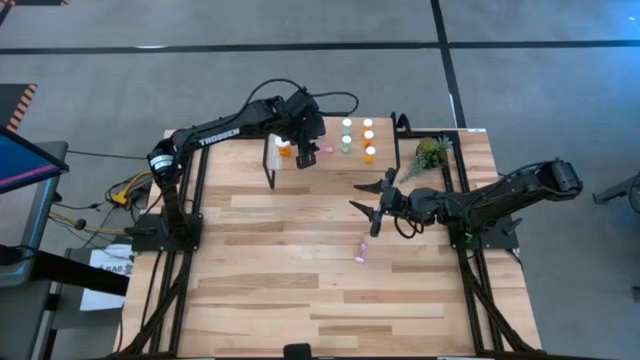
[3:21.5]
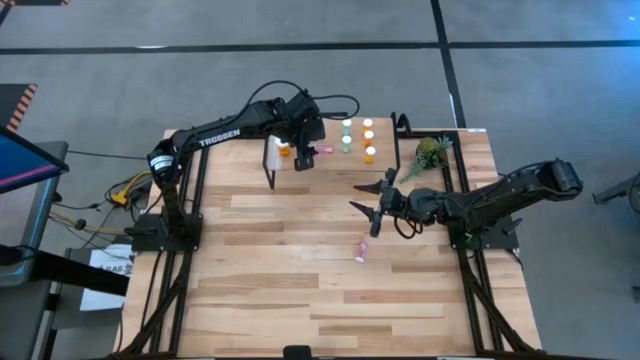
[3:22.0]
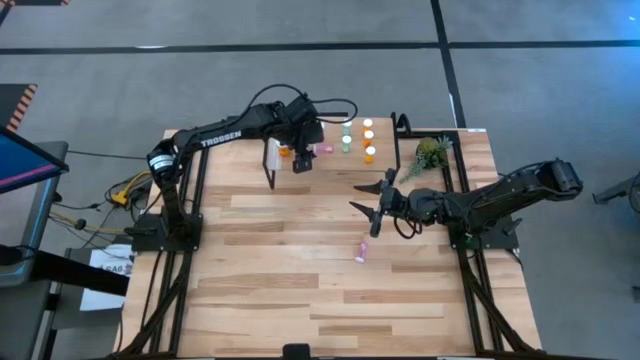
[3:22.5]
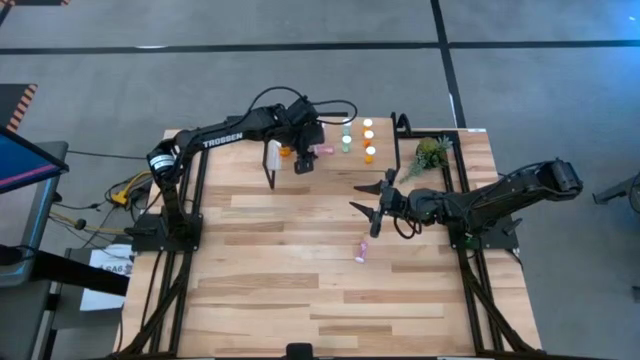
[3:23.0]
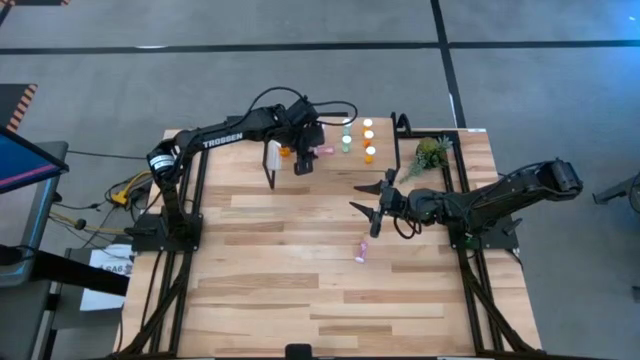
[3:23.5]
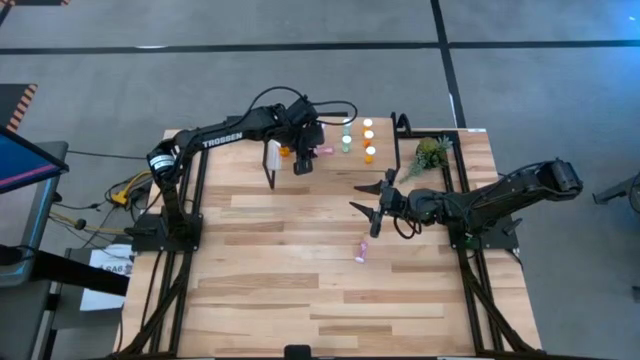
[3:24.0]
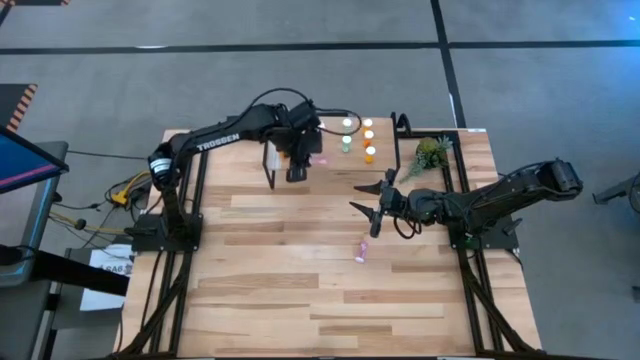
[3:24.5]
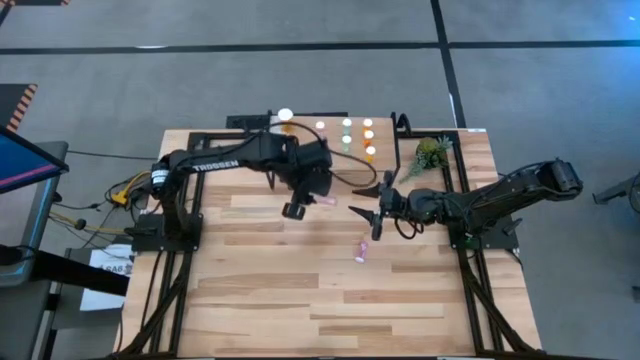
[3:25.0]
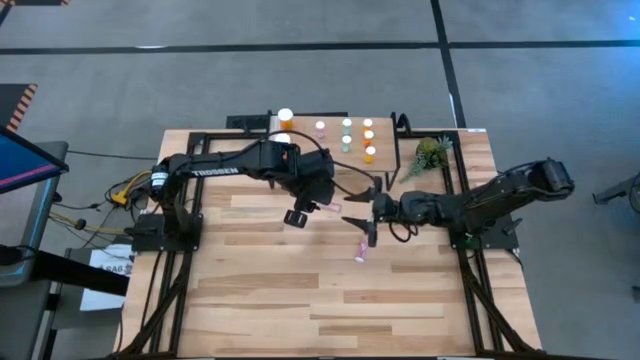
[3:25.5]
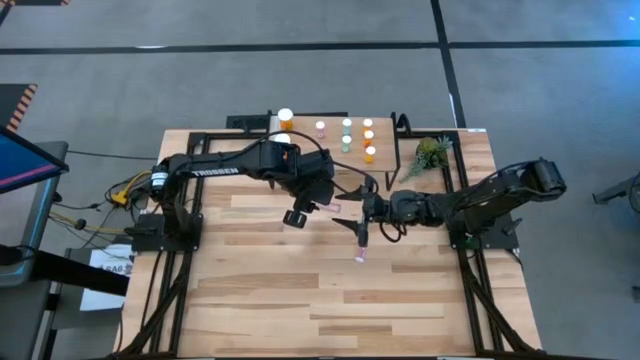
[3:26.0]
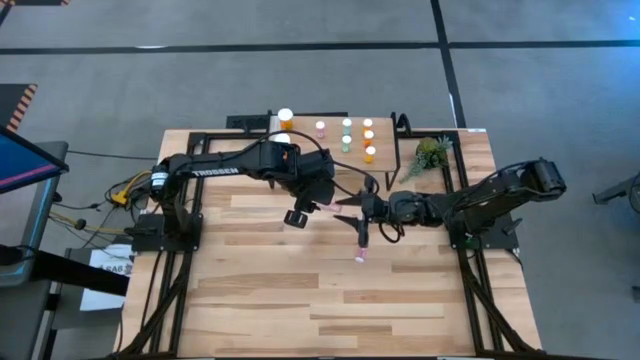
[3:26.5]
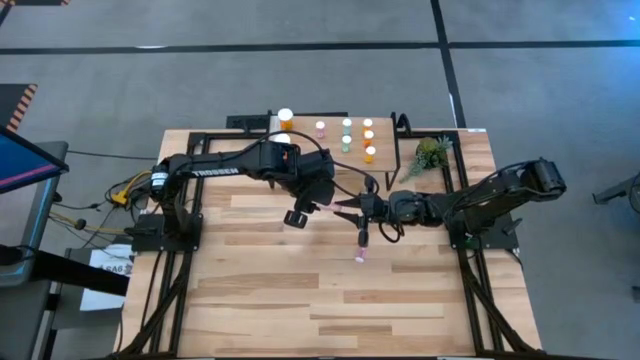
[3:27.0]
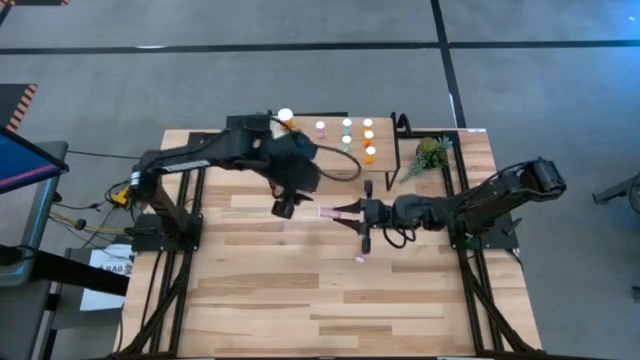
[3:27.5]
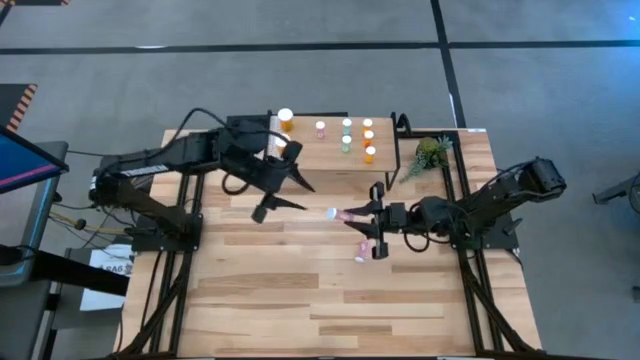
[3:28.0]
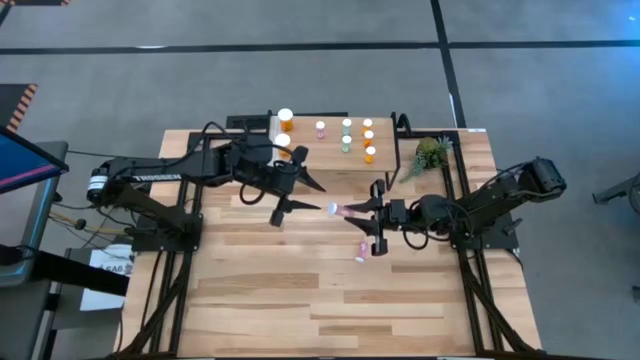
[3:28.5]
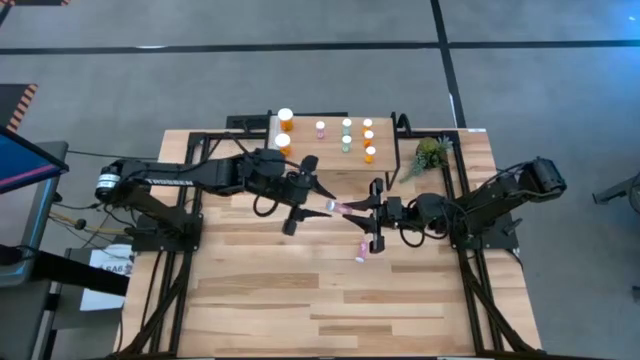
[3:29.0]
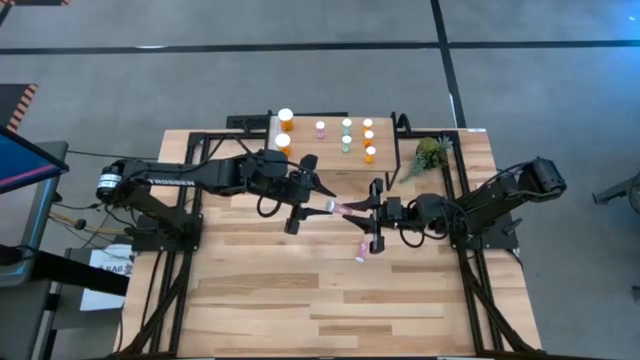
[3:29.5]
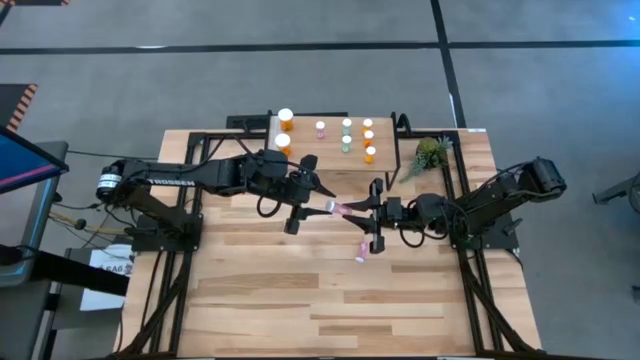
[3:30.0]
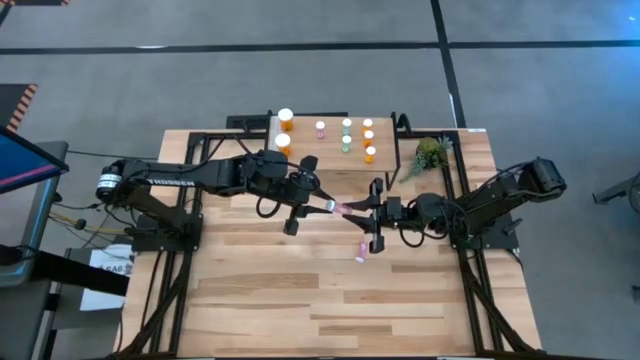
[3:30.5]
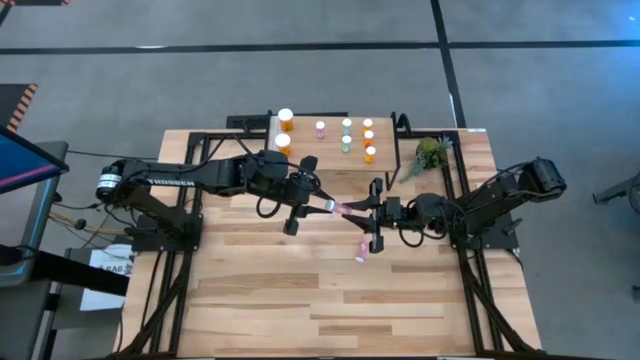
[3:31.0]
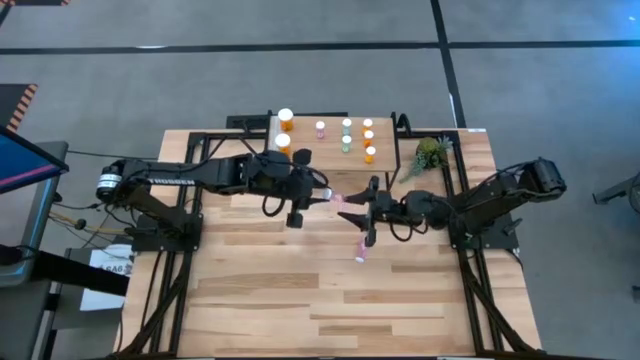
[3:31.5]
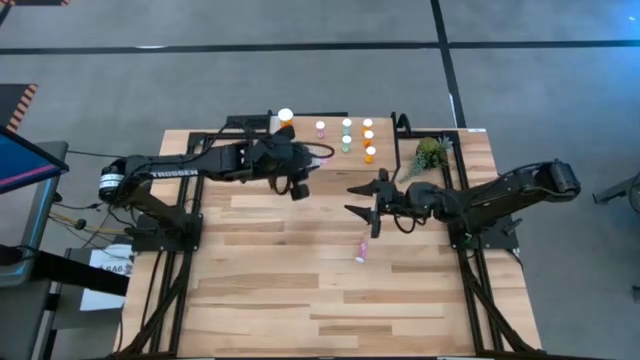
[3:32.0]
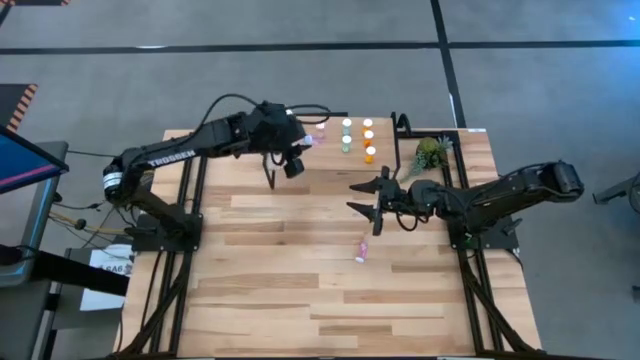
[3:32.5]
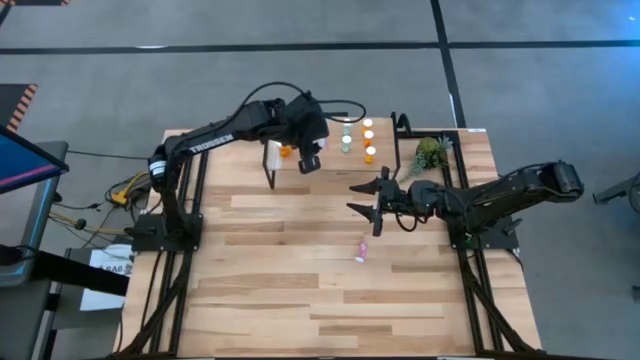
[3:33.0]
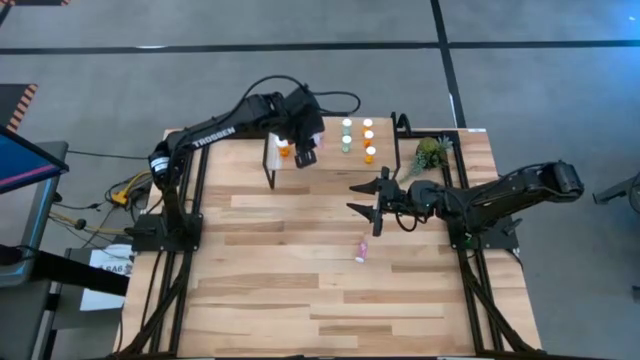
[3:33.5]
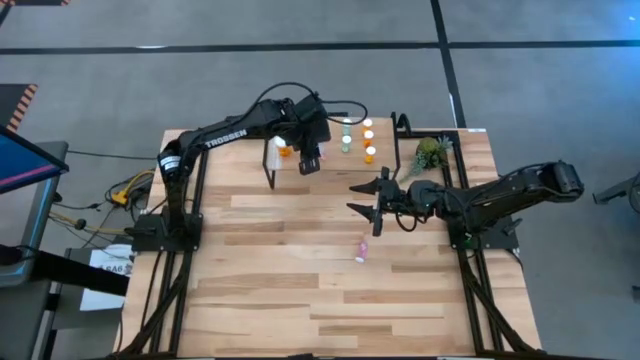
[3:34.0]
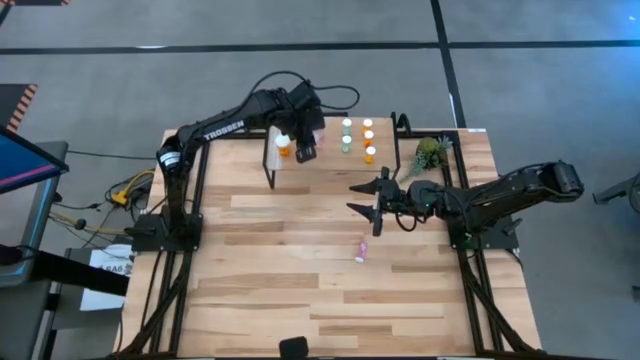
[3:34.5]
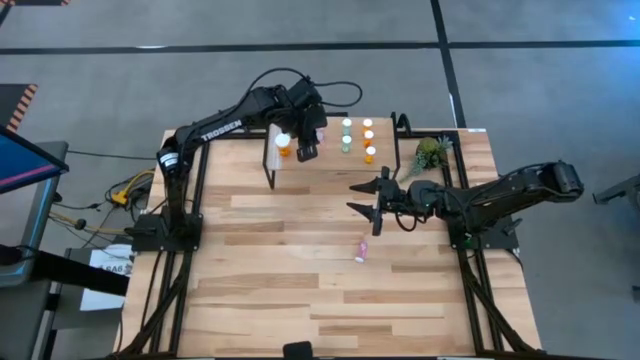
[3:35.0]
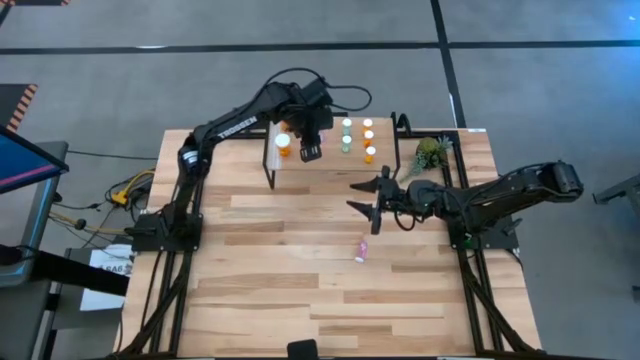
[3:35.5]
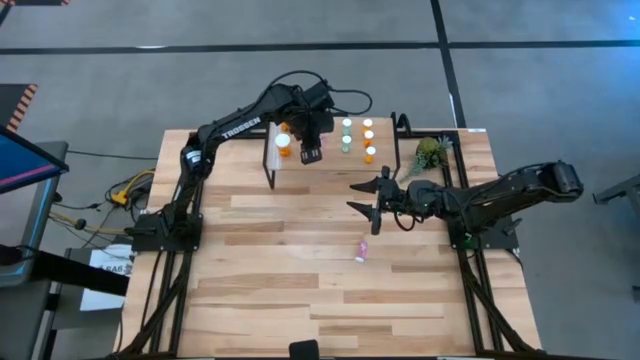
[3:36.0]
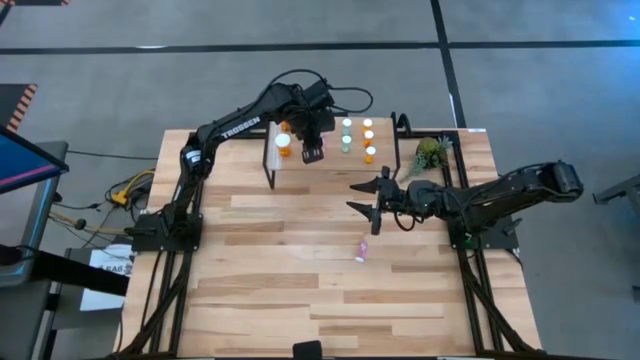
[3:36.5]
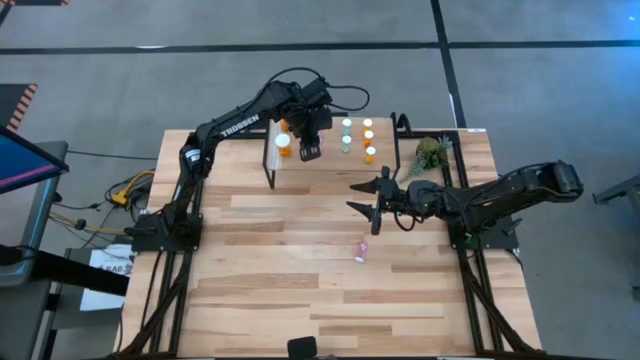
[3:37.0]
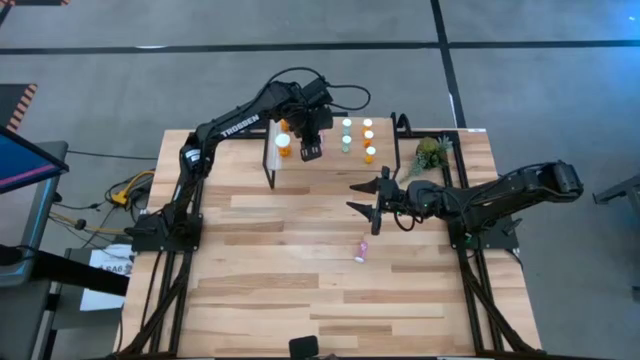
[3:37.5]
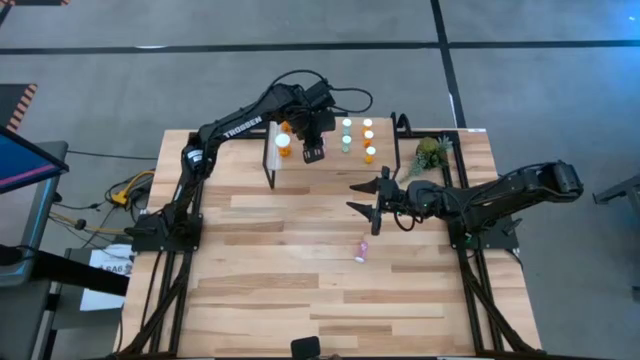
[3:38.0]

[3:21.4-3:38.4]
Task: Pick and place medicine bottles onto shelf by color
Put the top pink pill bottle on the shelf aligned with the pink pill bottle

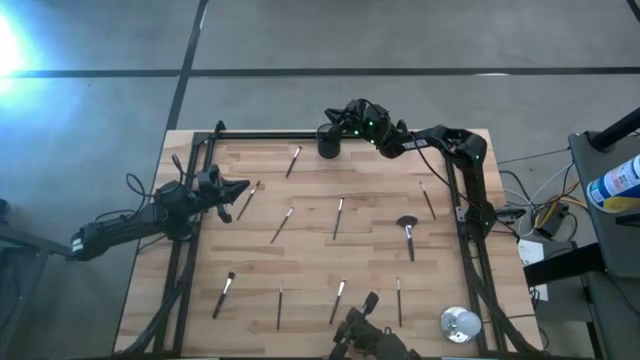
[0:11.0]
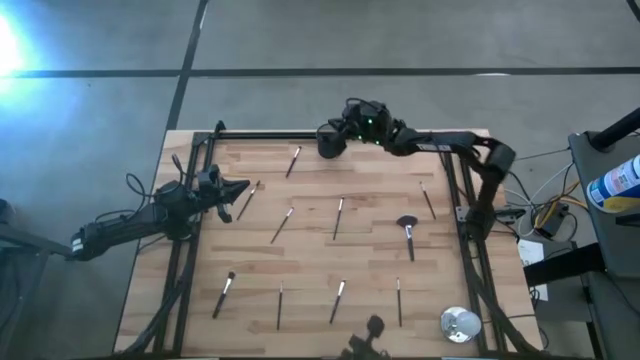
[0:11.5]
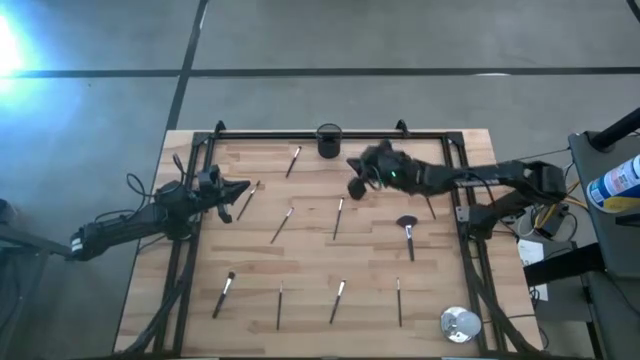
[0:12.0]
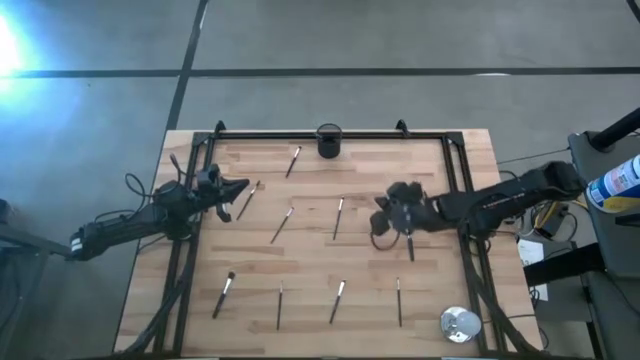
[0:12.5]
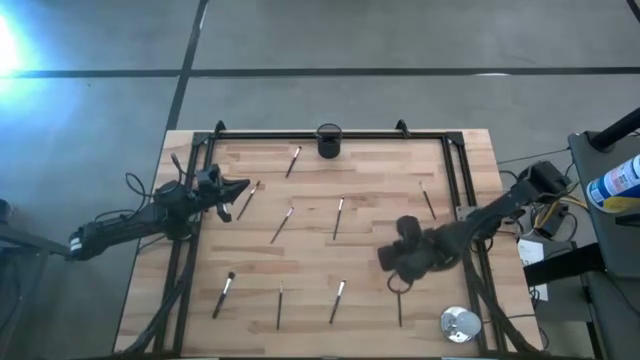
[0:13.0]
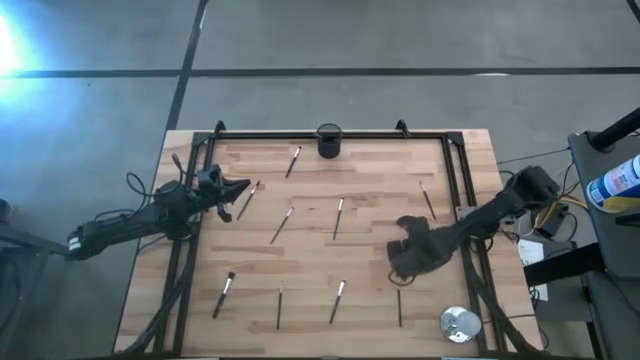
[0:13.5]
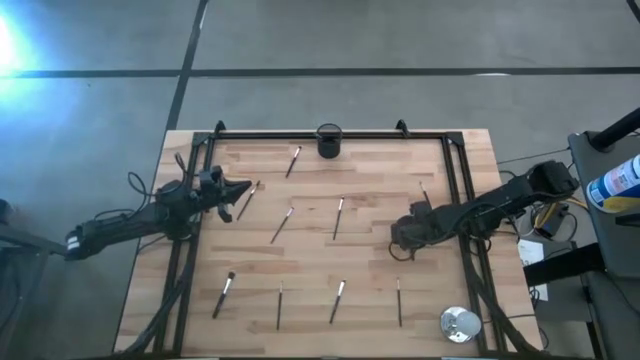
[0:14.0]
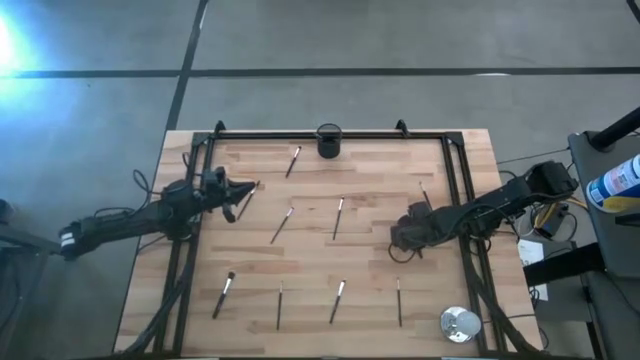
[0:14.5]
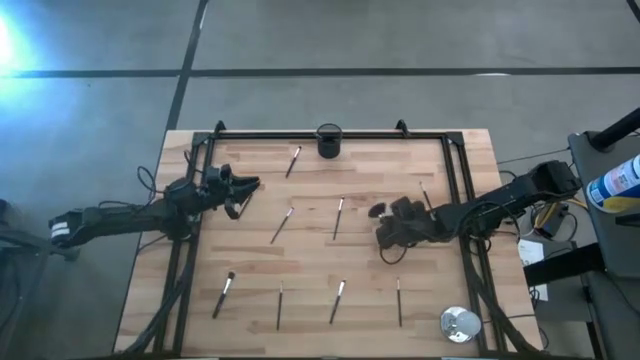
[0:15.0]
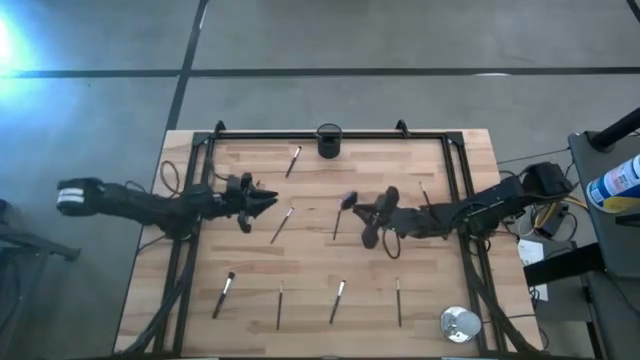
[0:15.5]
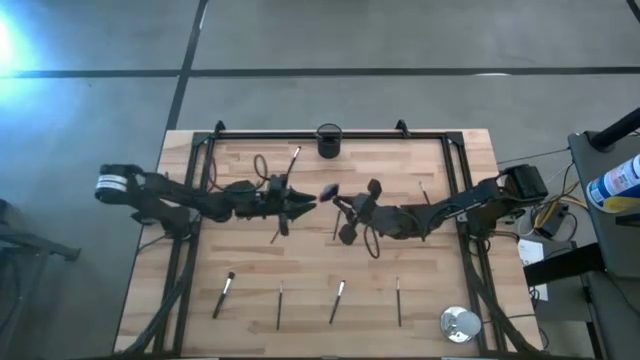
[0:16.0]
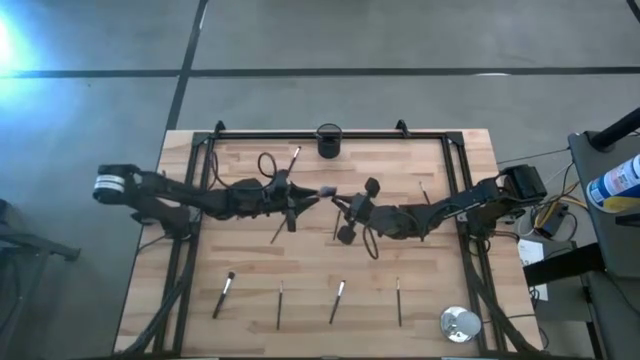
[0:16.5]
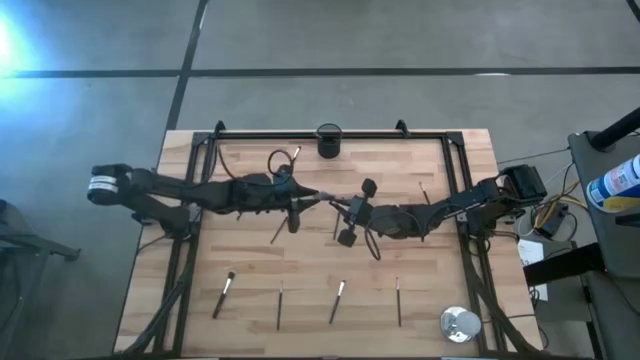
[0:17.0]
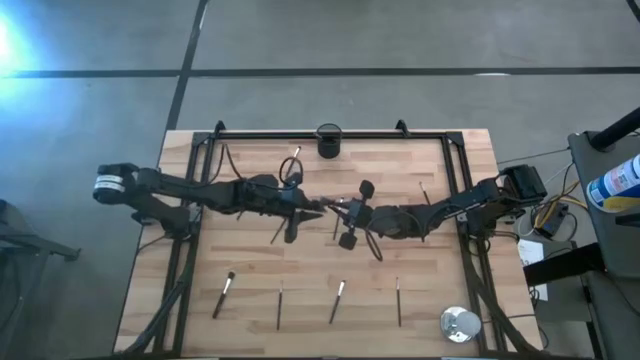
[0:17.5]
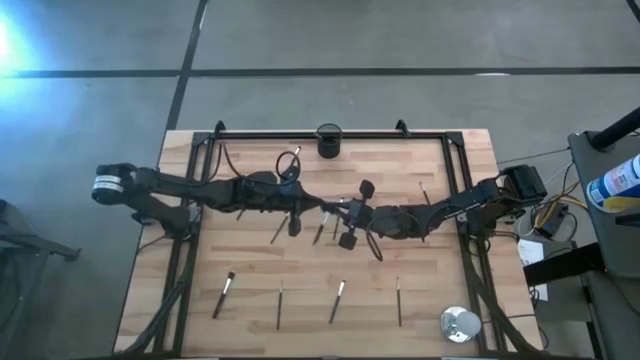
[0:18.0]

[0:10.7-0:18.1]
Task: Put items in baskets/containers
Put the black highlighter brush into the black pen holder
